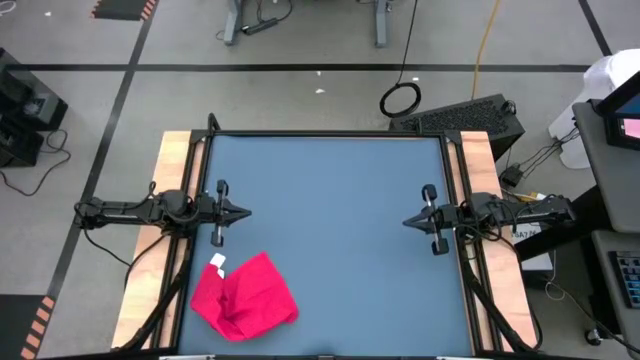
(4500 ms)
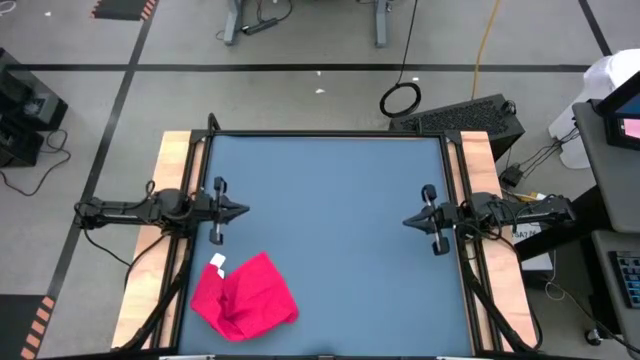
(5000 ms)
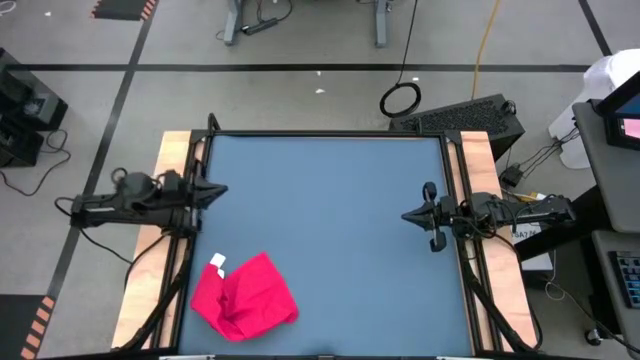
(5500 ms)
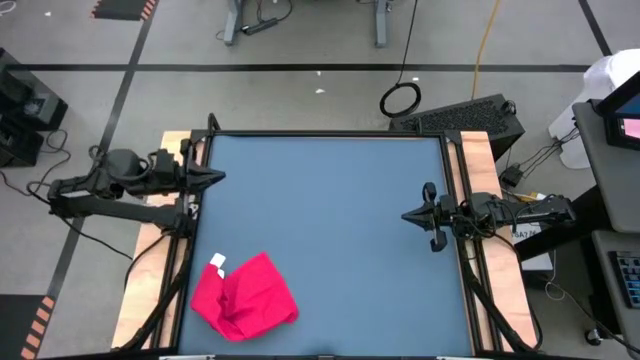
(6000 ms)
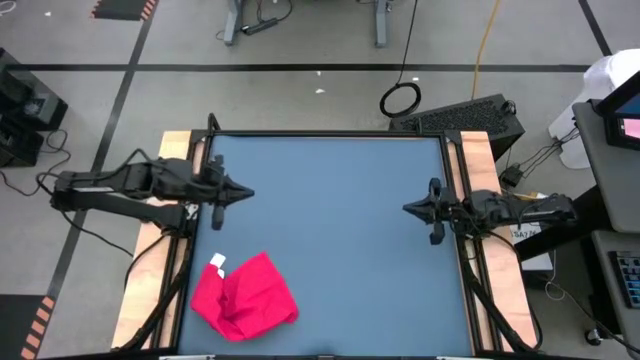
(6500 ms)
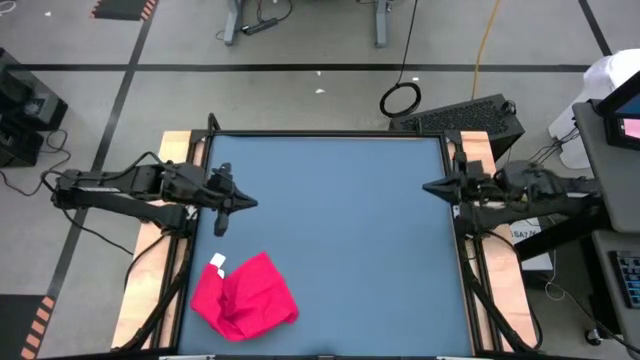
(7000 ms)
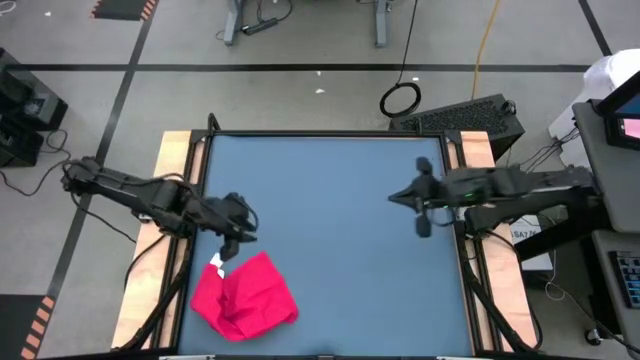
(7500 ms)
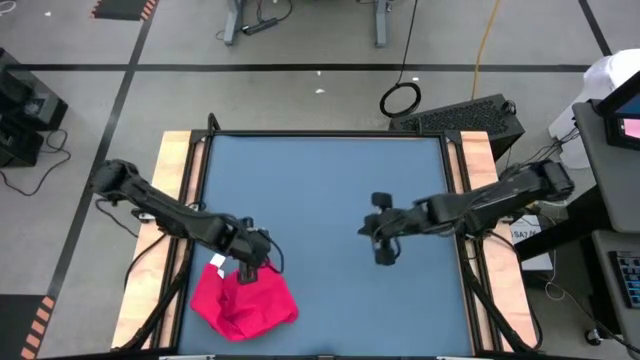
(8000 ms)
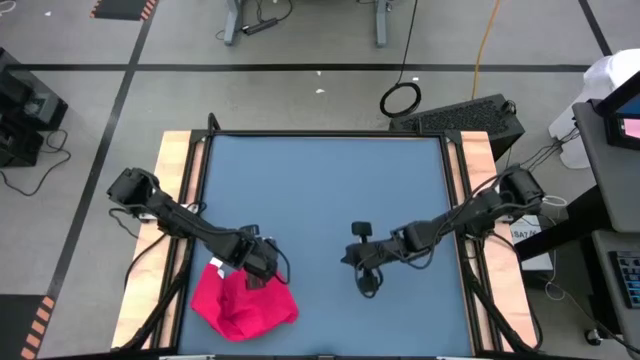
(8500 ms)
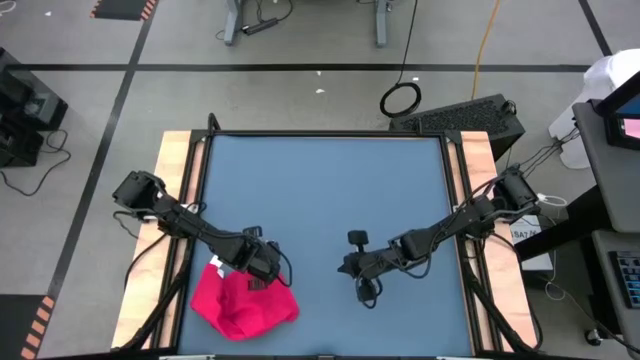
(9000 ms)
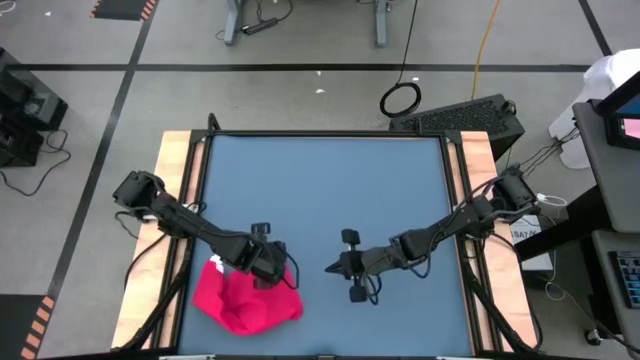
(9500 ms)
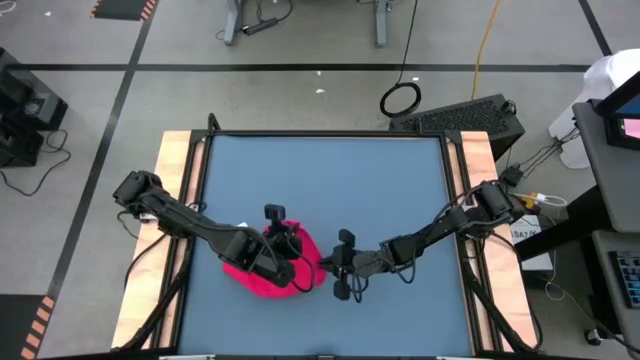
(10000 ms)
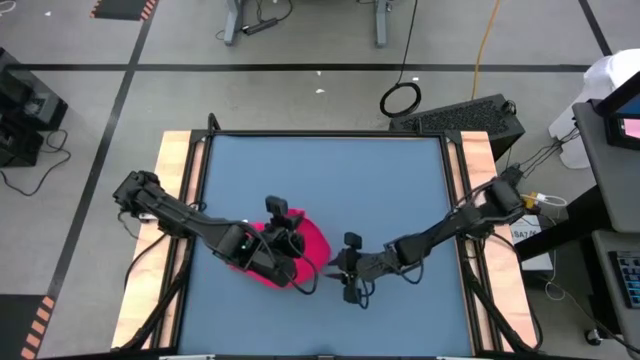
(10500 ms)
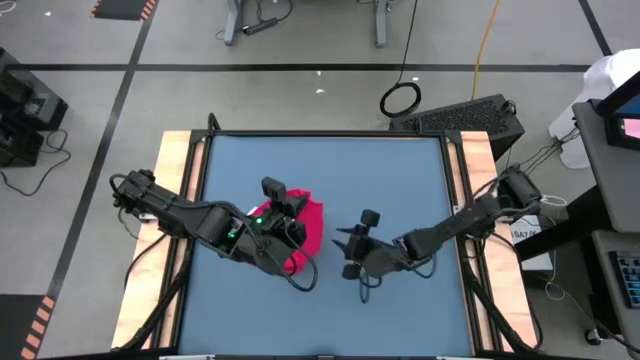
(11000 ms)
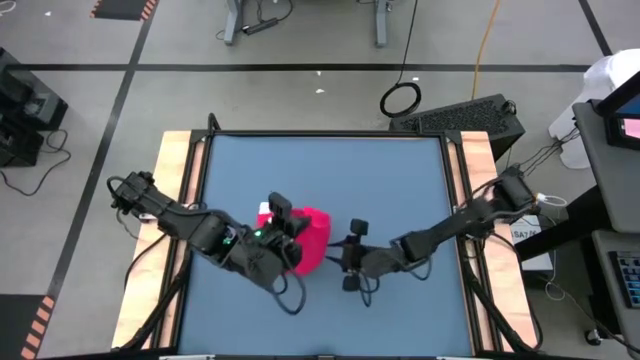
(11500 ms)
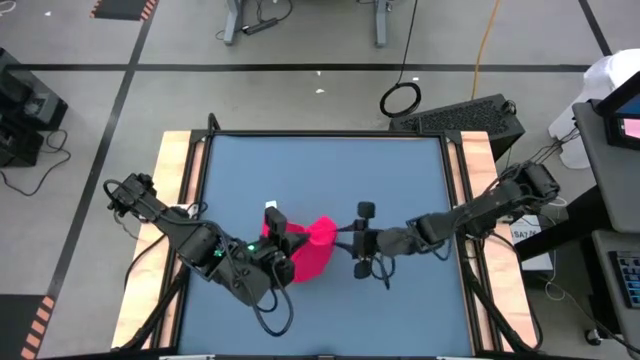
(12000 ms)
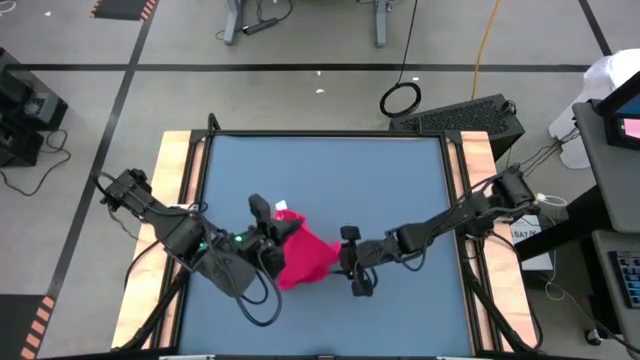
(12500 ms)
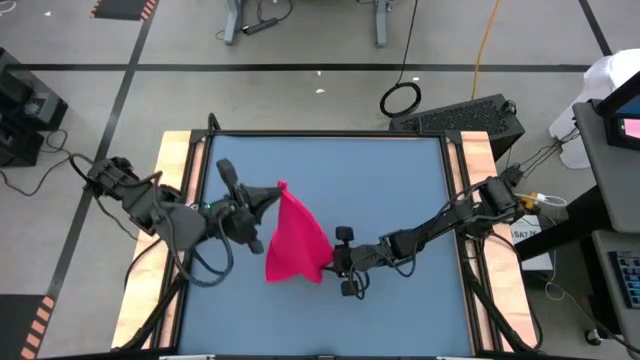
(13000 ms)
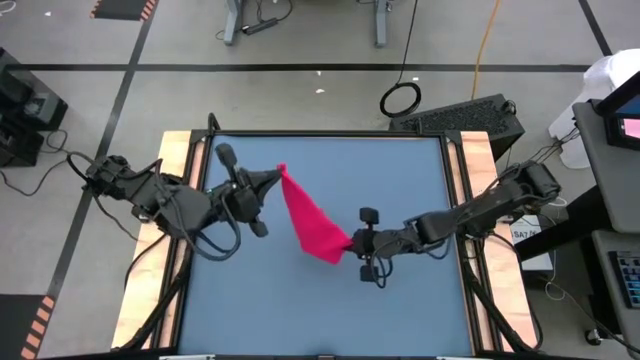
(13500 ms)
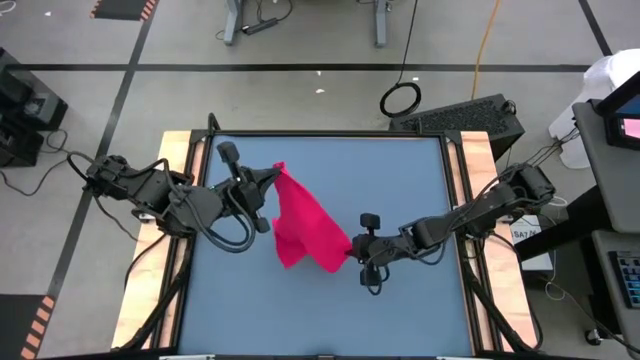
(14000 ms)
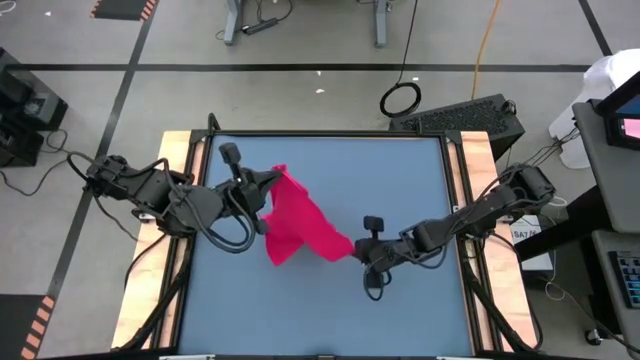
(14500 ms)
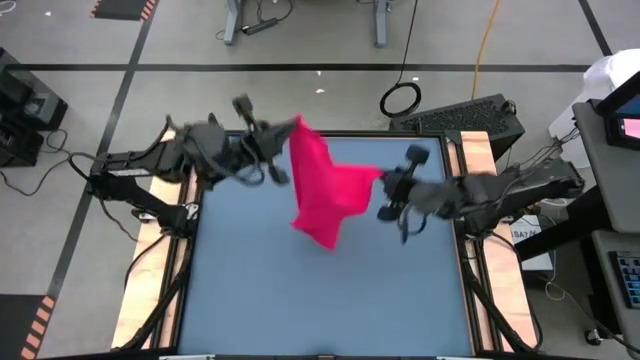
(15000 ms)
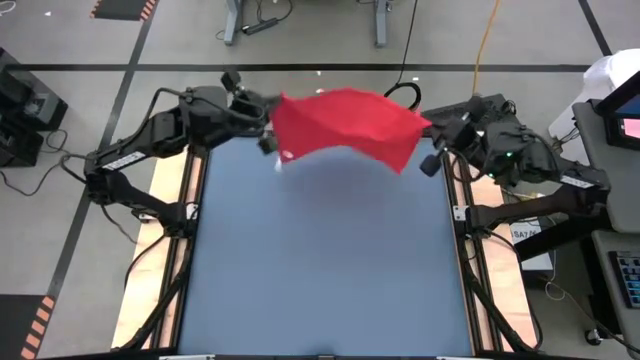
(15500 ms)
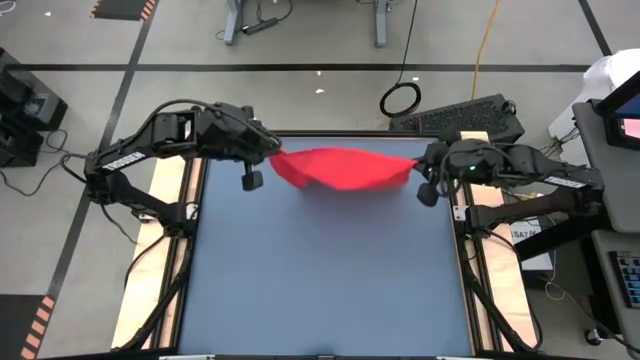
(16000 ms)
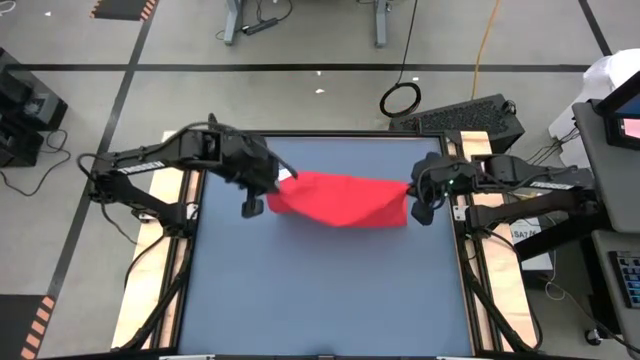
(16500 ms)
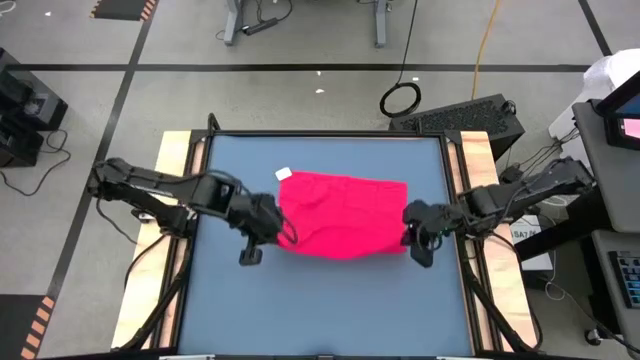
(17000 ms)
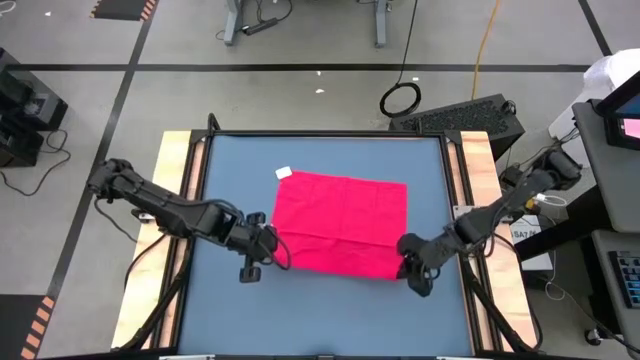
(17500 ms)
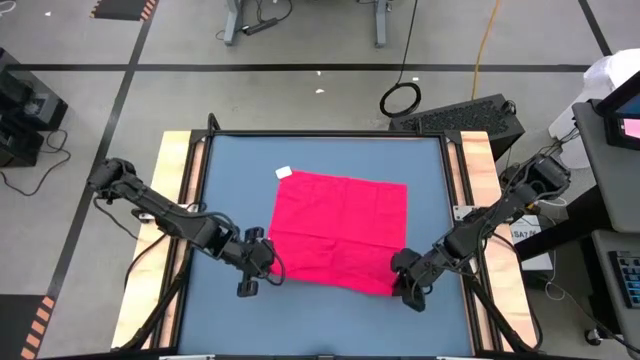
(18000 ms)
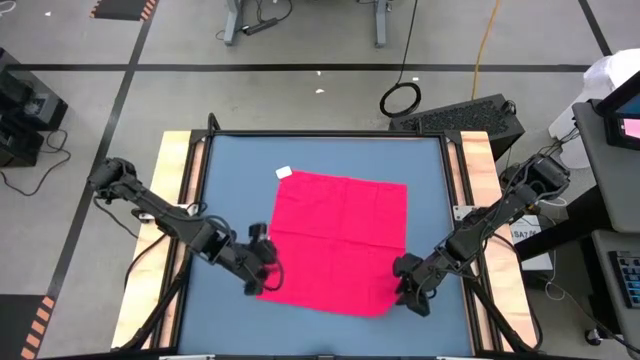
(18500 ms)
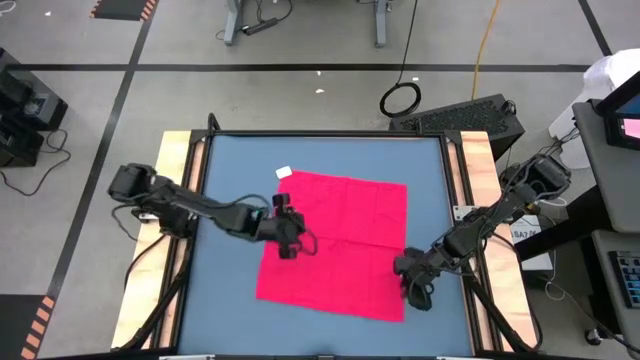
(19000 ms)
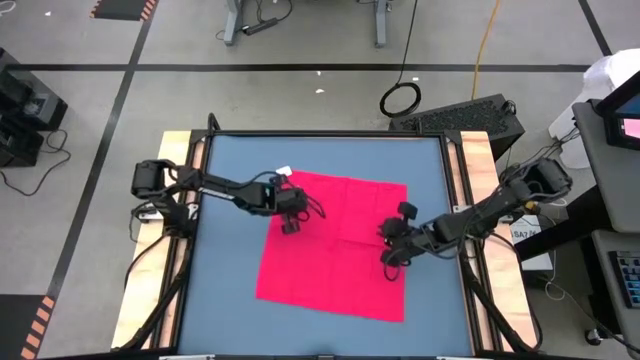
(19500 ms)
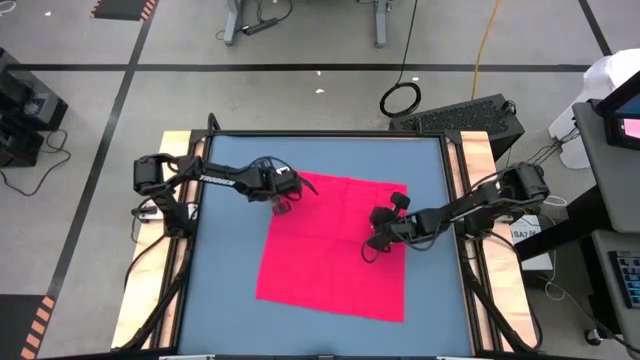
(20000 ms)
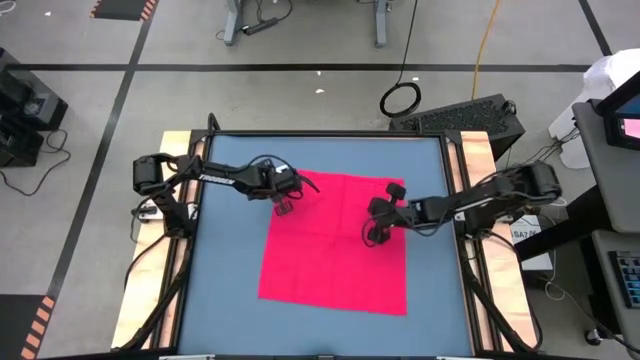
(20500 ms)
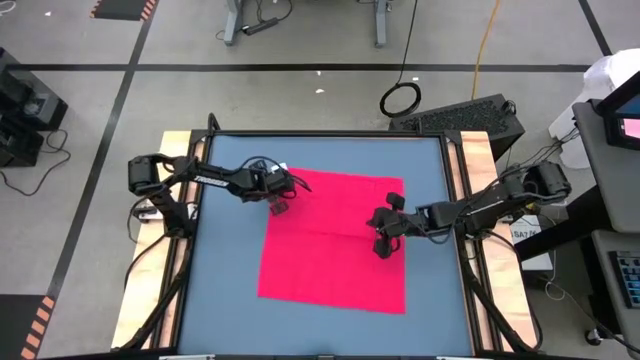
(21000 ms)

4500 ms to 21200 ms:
Task: Roll towel
Roll the red towel

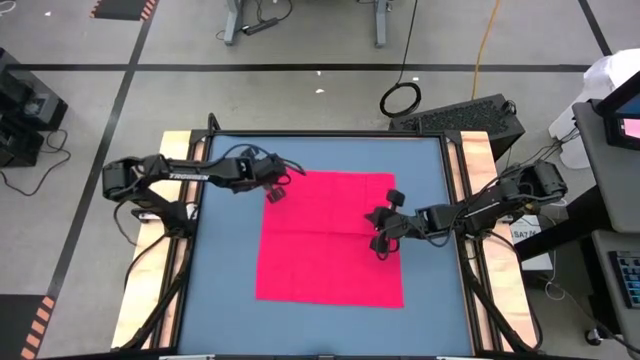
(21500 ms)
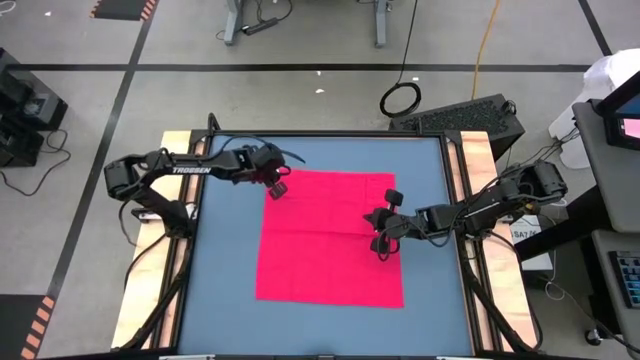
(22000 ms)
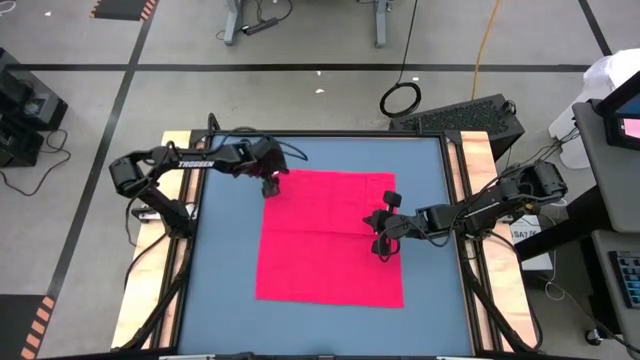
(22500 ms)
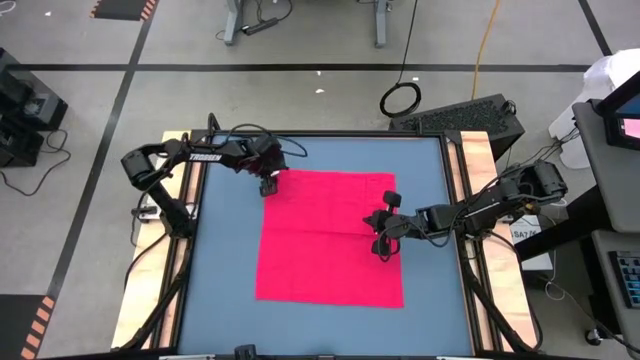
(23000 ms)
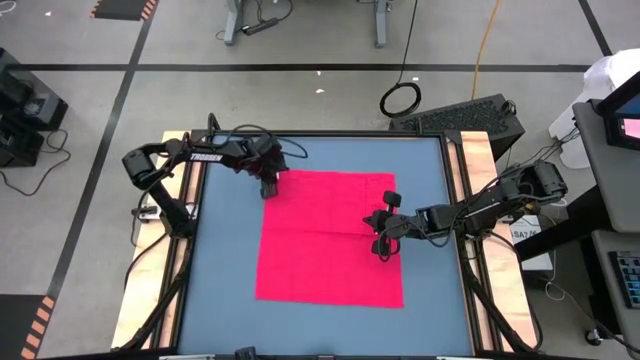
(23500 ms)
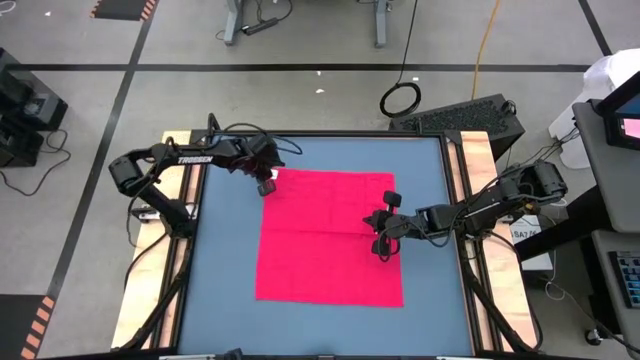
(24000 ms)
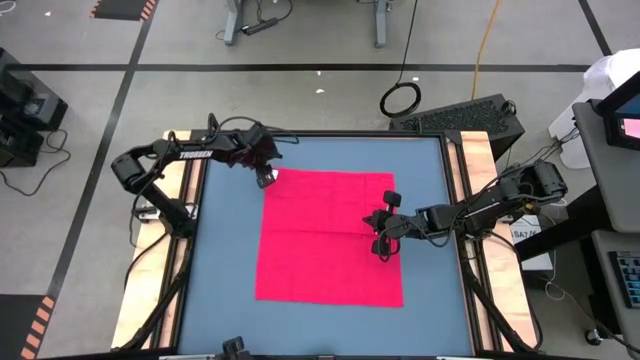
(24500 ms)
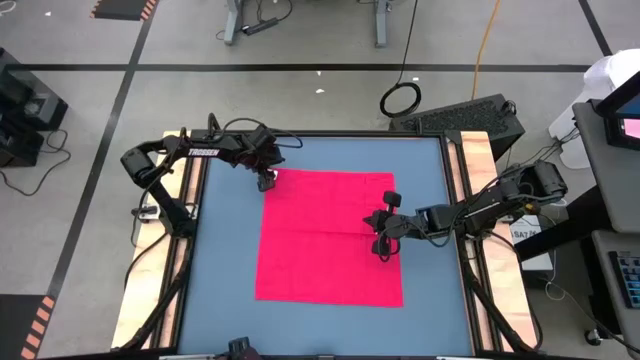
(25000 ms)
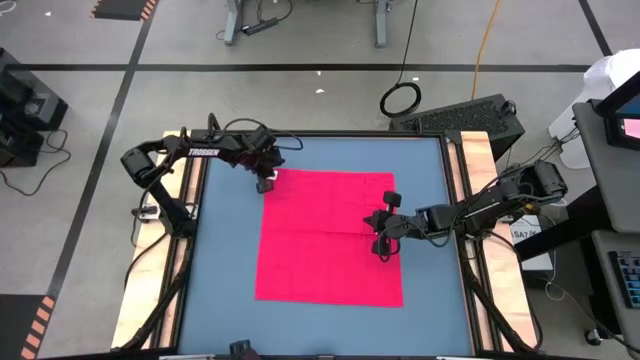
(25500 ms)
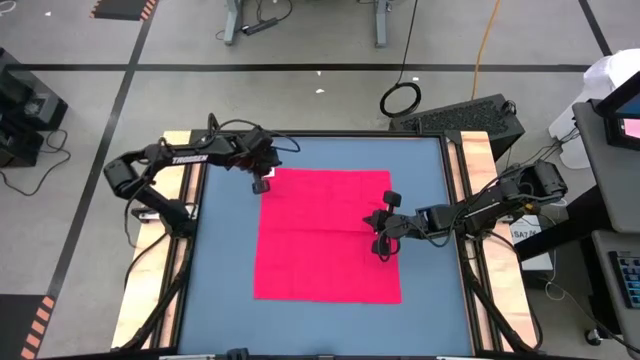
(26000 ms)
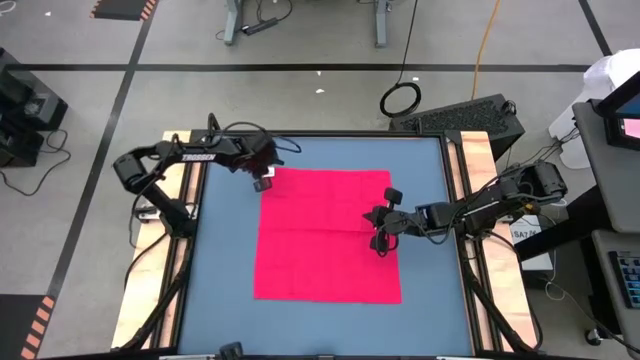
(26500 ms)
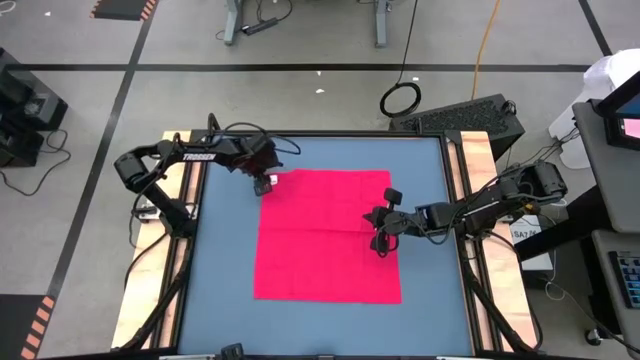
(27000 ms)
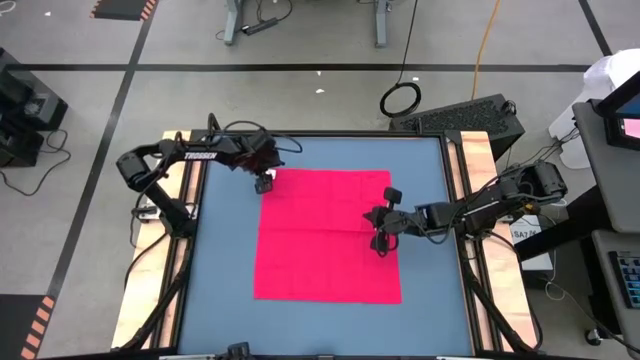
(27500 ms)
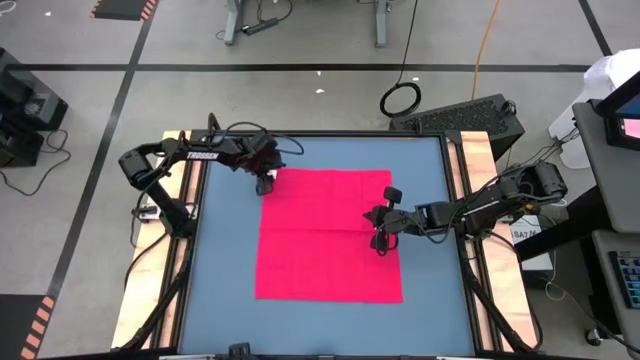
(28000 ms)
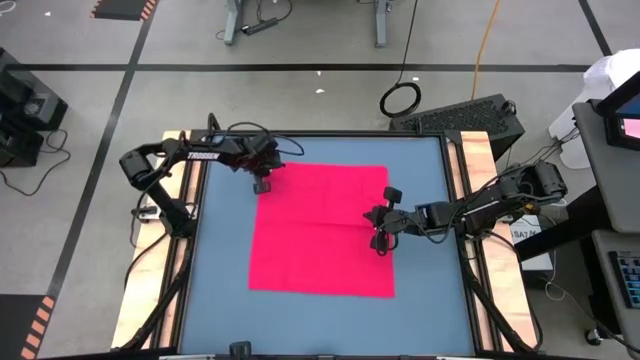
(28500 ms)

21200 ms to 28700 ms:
Roll the red towel
